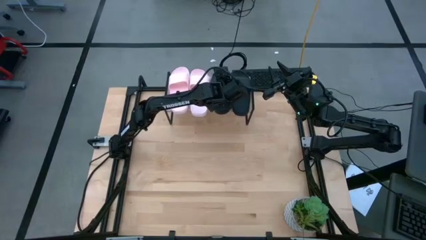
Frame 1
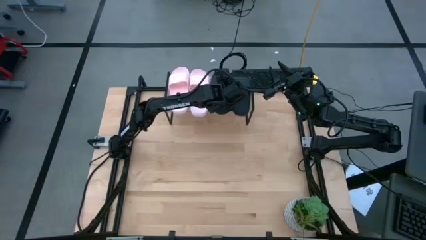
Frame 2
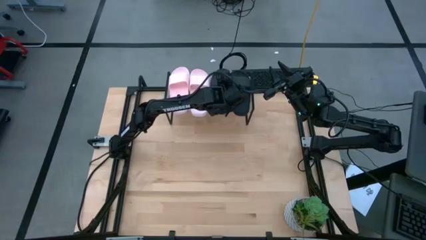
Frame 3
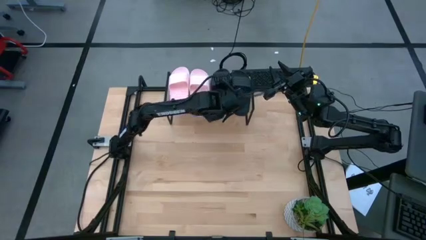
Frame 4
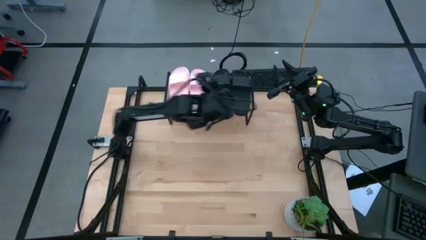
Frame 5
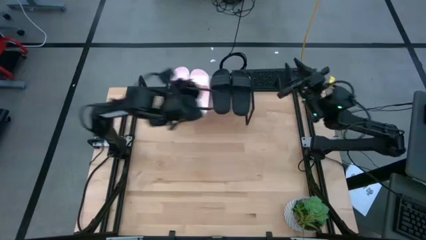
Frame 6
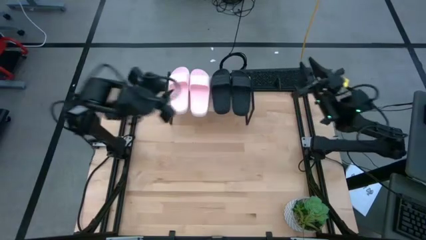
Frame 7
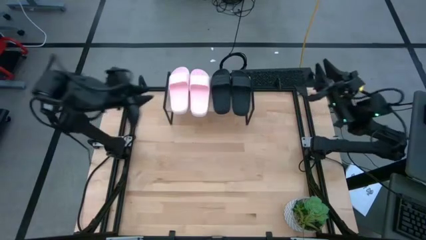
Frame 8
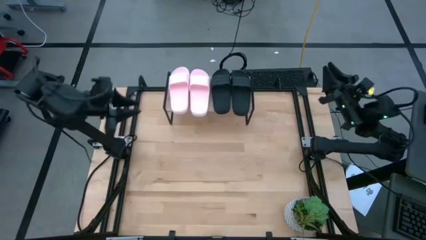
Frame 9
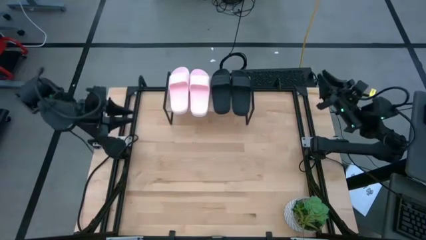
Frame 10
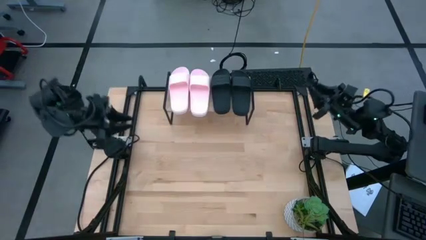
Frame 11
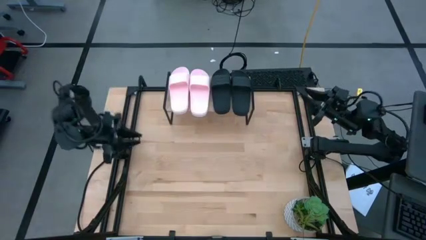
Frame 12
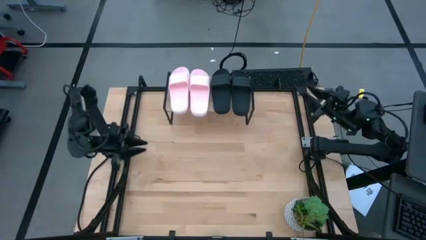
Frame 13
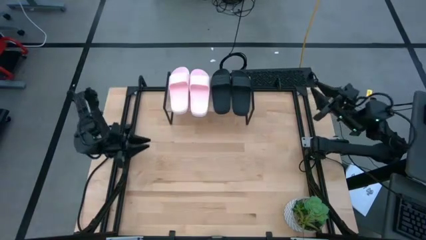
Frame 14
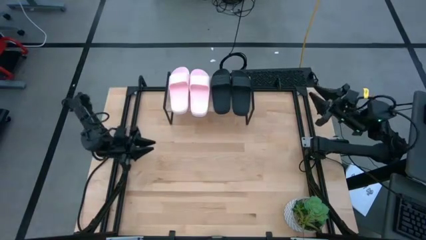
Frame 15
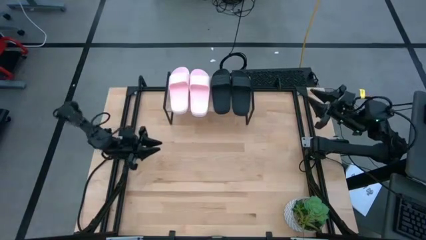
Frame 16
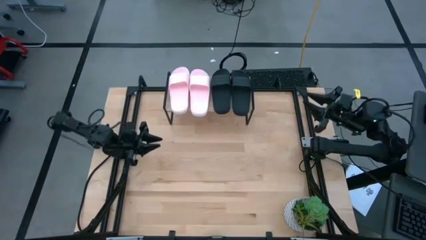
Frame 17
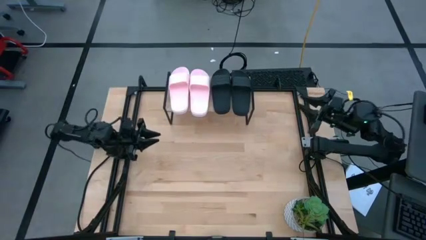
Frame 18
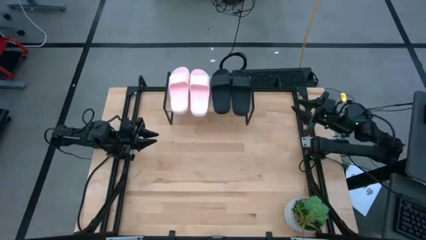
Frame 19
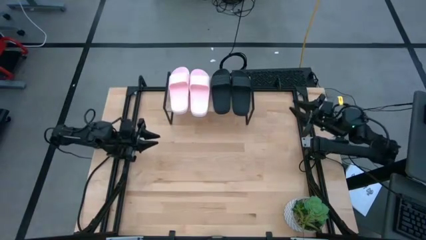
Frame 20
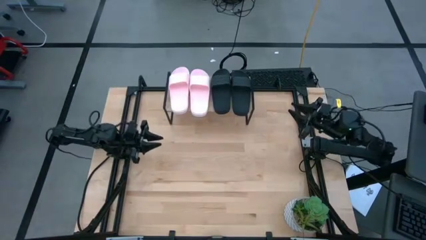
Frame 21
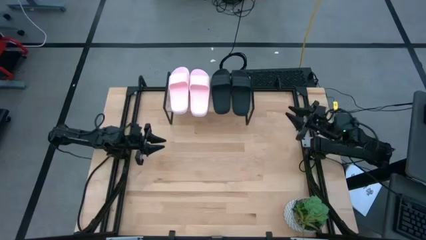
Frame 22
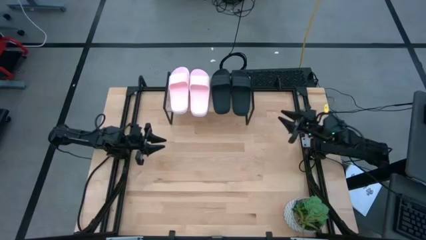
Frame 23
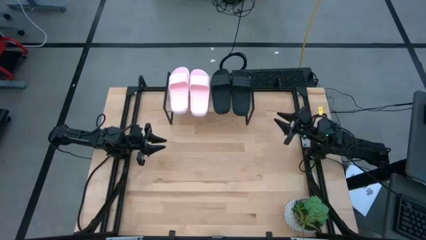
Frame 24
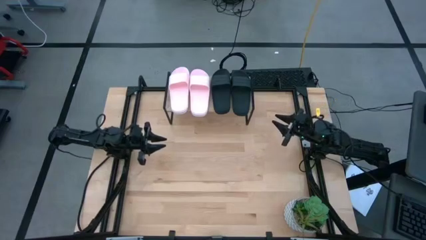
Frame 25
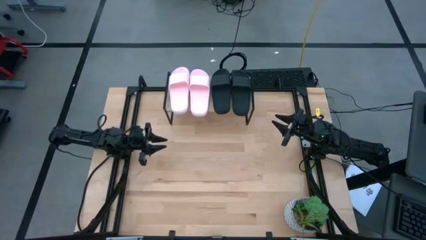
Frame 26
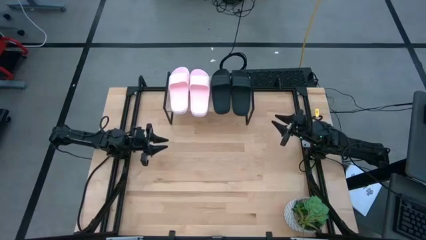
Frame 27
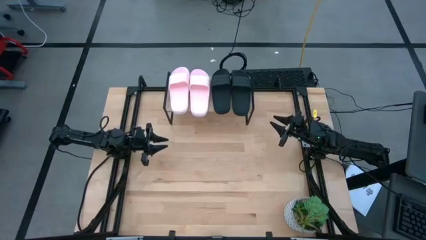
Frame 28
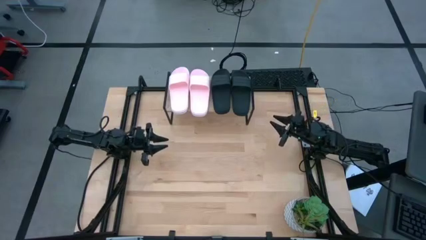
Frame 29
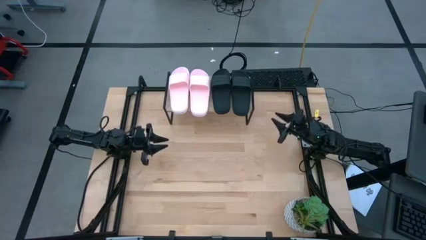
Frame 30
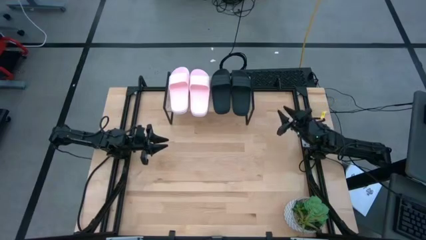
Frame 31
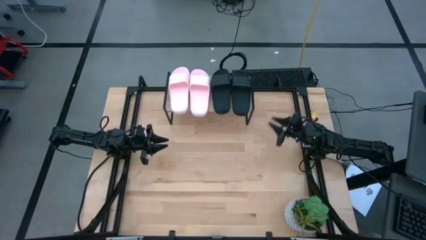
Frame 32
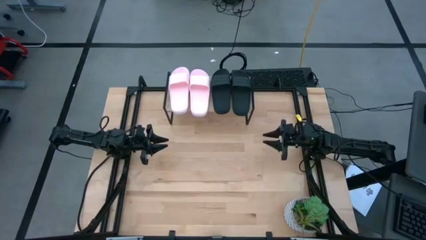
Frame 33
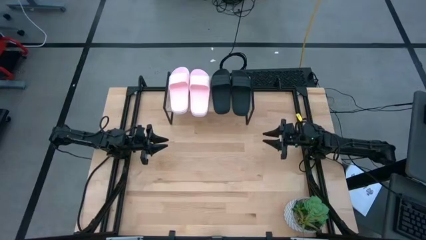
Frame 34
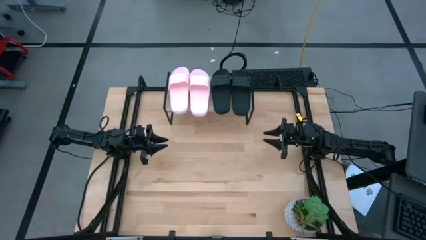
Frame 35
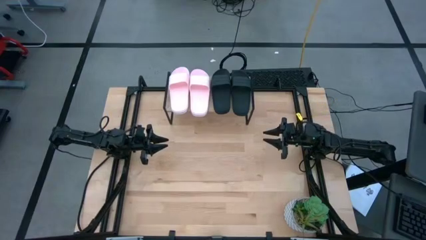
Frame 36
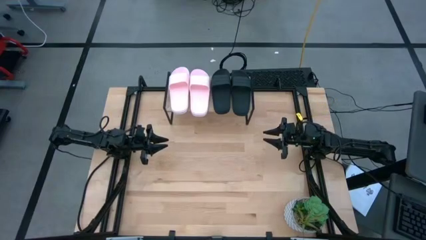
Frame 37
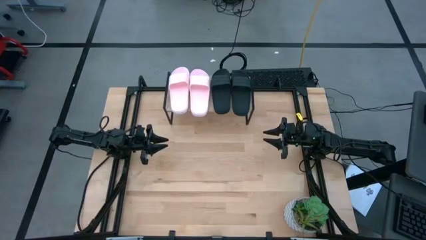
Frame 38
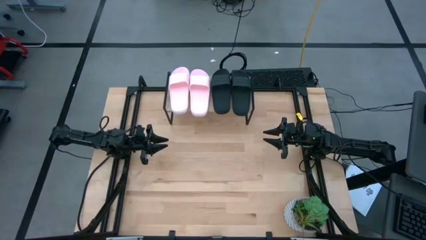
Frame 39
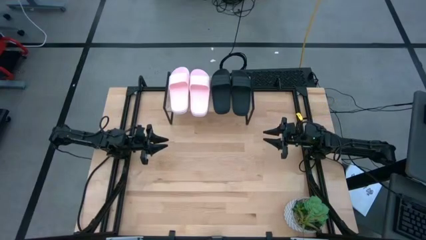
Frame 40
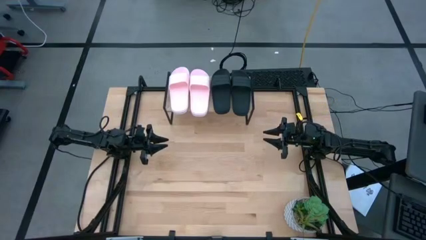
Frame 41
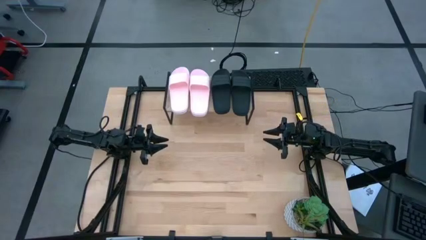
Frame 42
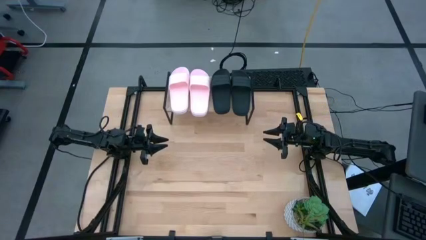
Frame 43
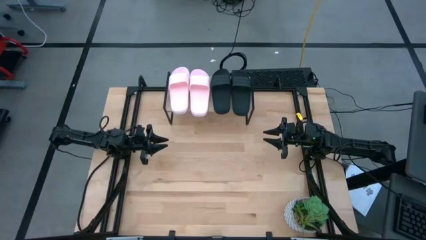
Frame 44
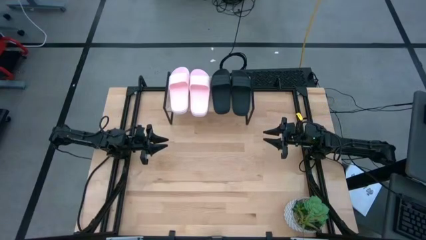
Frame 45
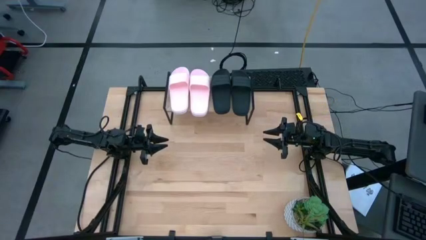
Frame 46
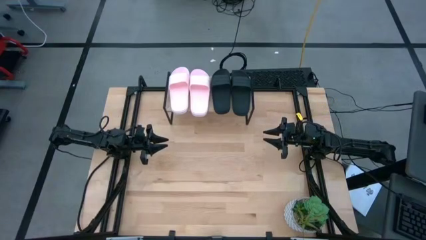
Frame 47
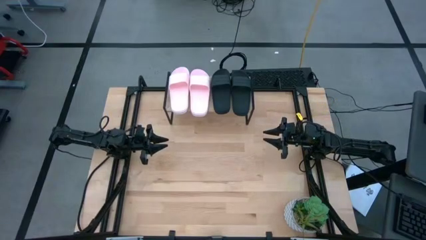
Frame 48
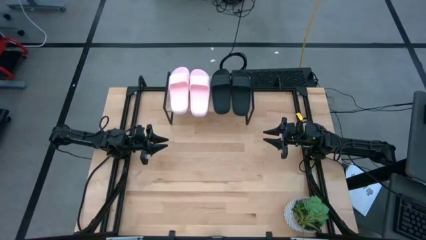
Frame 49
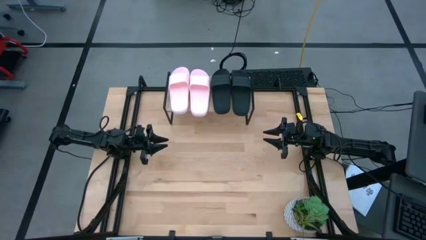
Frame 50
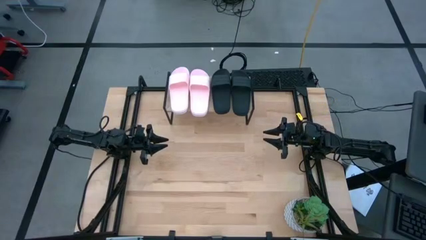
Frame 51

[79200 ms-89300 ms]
Task: Pick and place slides into the shelf
Return to Home Position

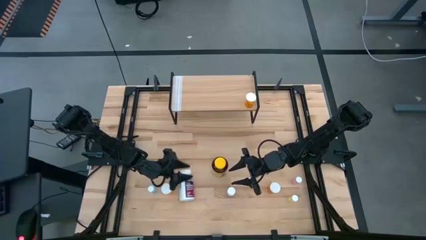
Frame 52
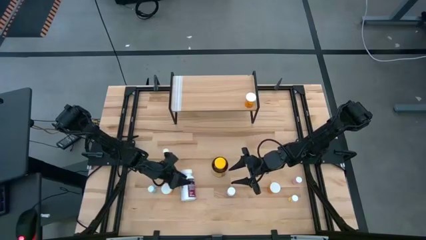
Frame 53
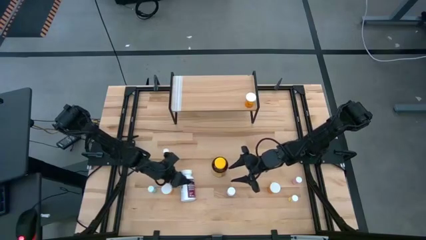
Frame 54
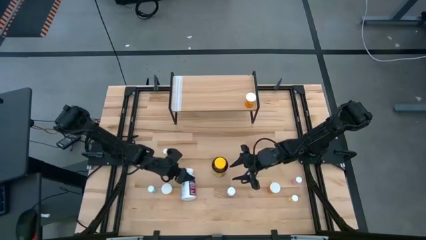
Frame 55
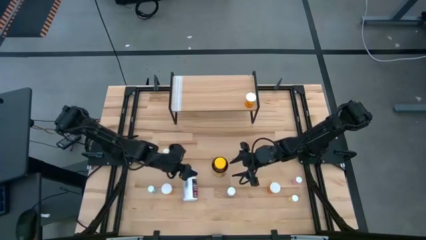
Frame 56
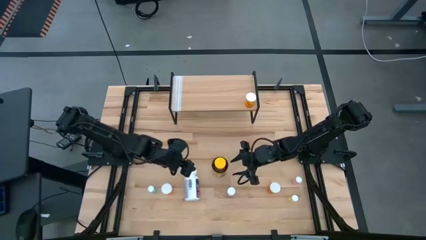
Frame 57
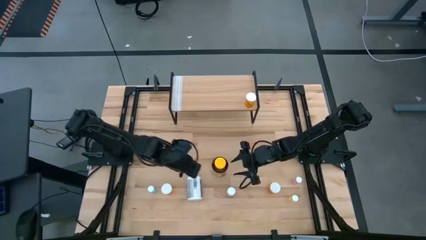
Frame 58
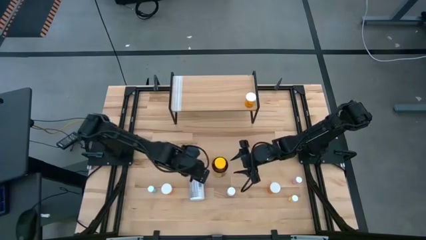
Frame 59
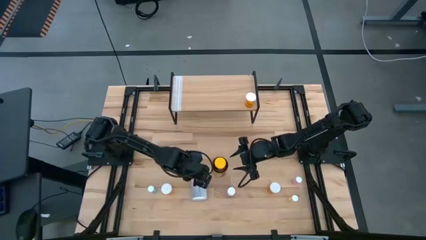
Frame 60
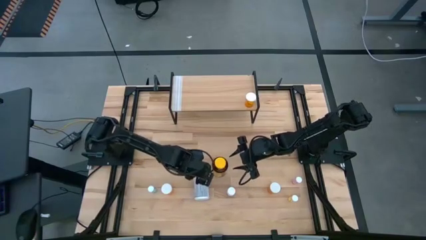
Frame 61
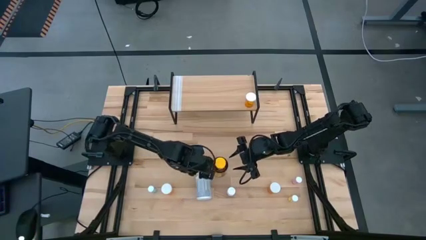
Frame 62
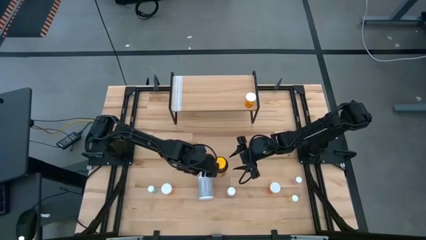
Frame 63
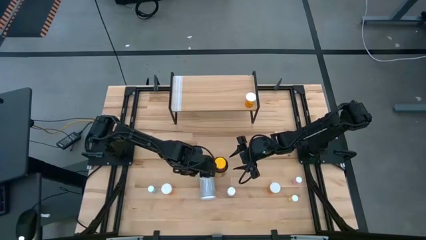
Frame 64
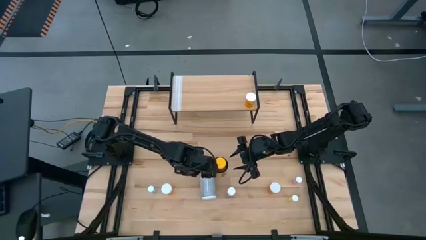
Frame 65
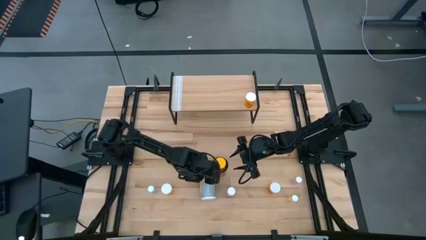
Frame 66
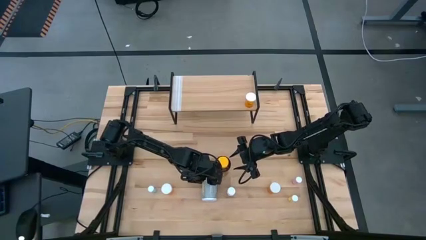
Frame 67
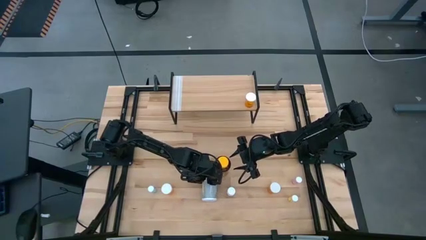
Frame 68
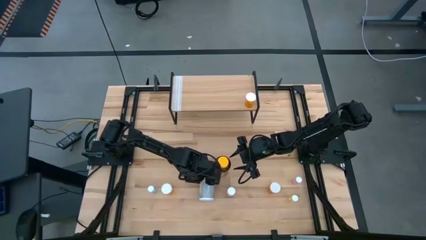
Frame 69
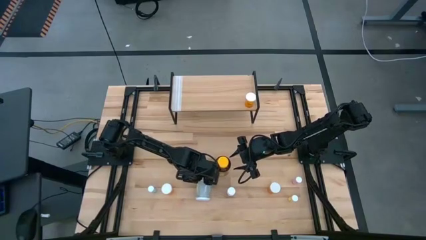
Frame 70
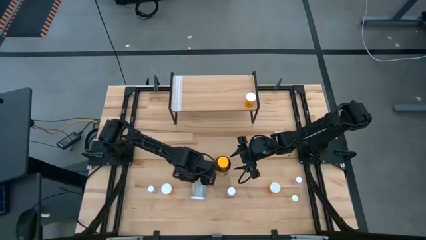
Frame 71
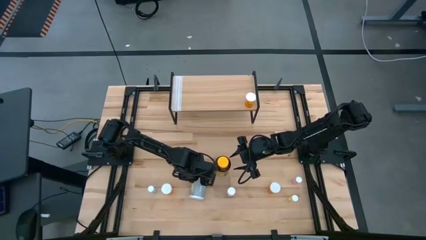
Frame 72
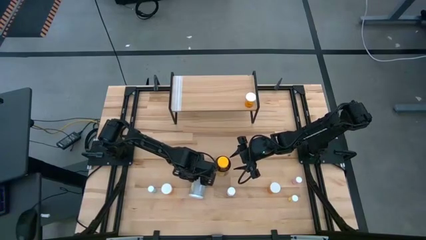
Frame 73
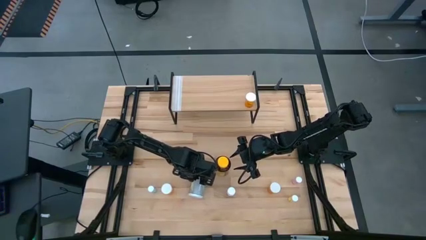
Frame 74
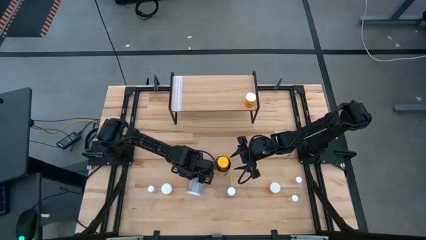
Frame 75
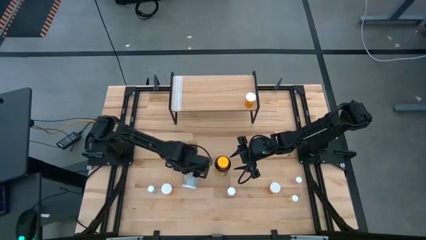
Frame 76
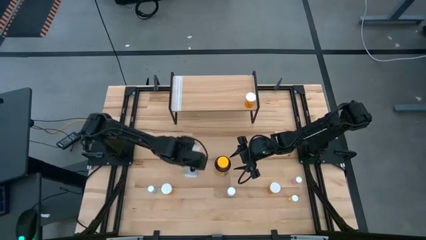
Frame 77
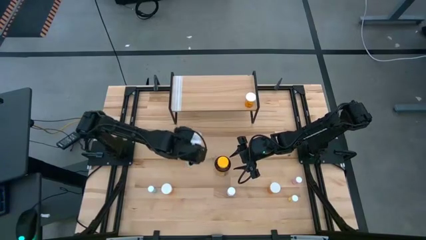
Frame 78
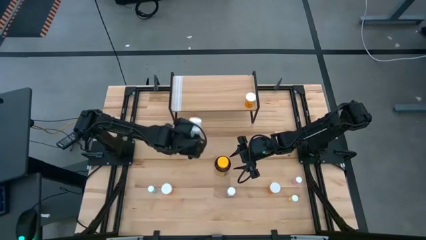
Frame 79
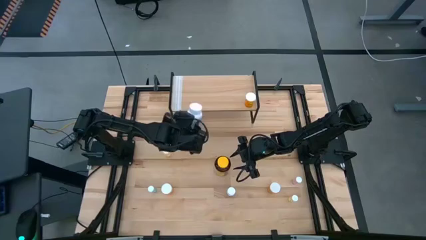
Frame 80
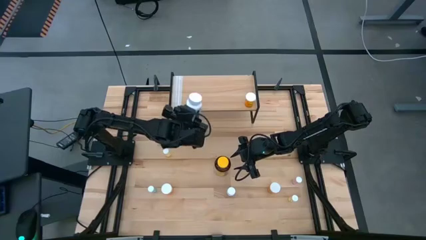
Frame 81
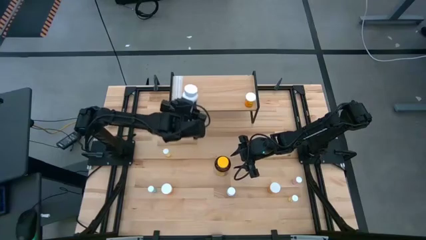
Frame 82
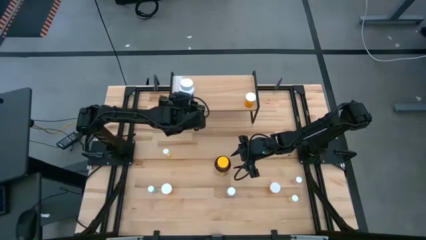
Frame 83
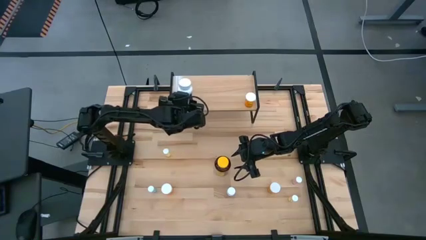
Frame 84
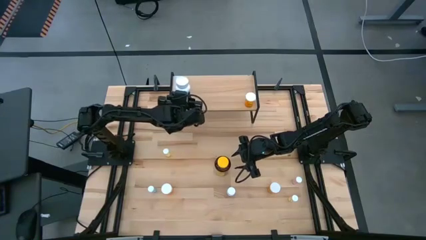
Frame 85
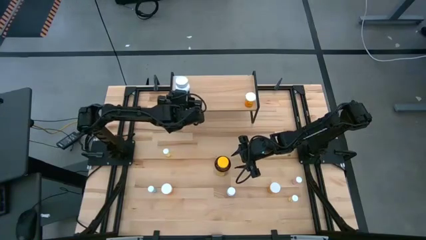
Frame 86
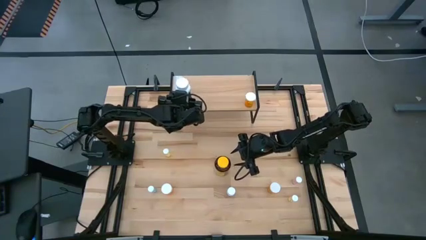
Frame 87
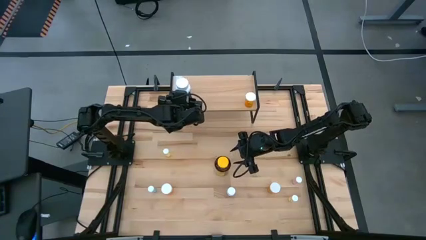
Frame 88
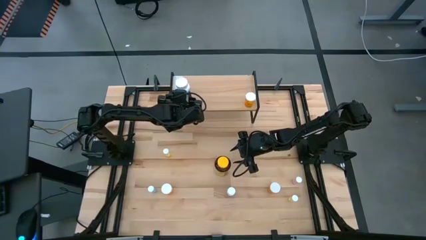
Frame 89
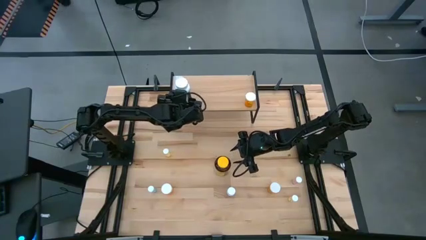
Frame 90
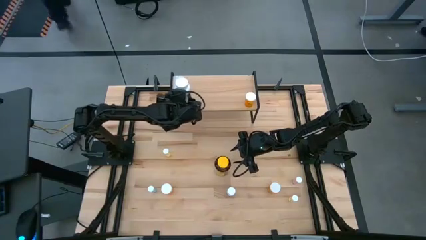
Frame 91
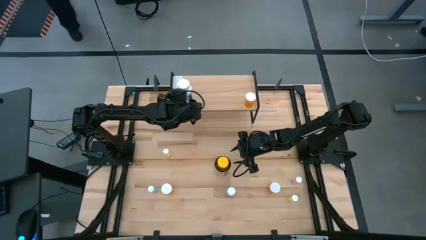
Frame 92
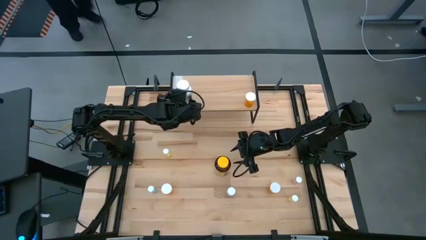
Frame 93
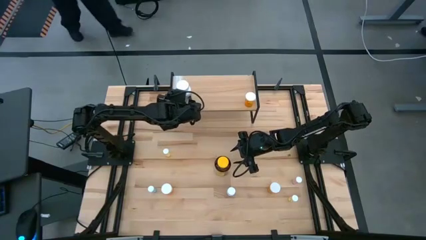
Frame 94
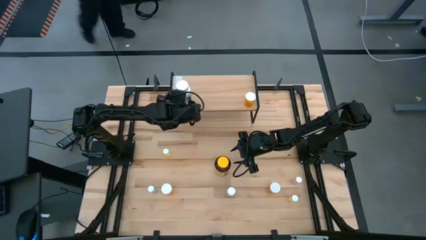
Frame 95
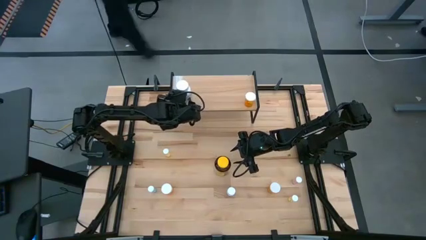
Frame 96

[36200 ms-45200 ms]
Task: Pick and place medicine bottles onto shelf by color
Put the big white medicine bottle on the shelf
